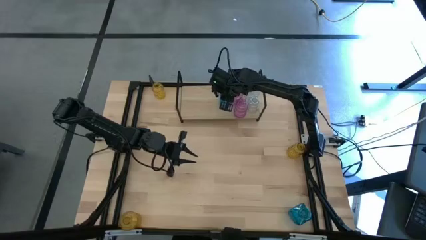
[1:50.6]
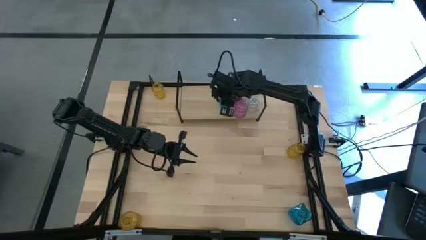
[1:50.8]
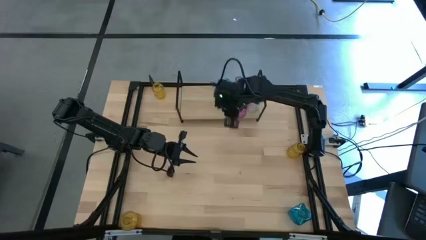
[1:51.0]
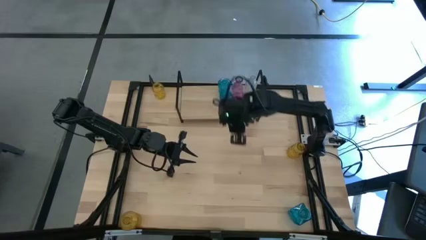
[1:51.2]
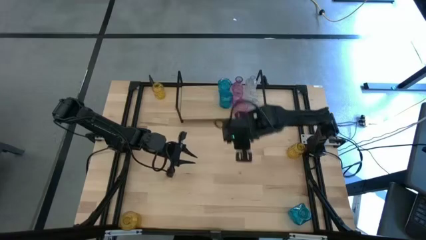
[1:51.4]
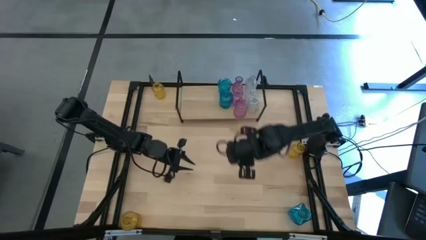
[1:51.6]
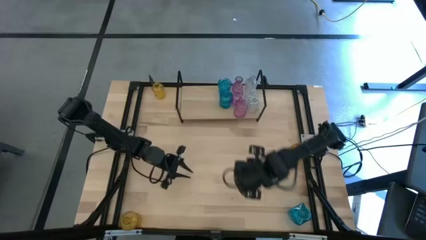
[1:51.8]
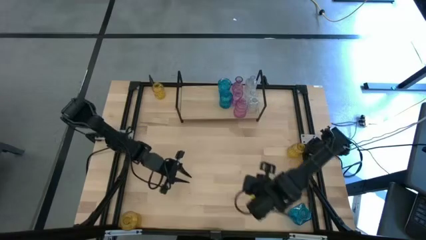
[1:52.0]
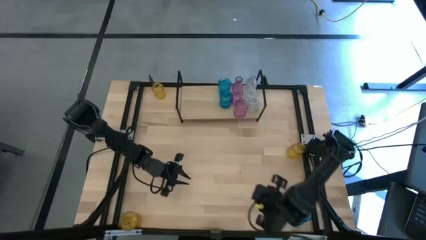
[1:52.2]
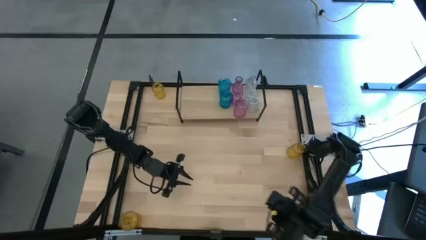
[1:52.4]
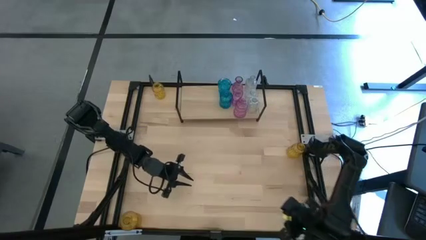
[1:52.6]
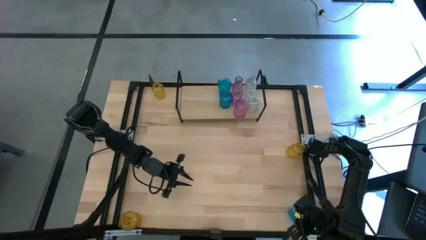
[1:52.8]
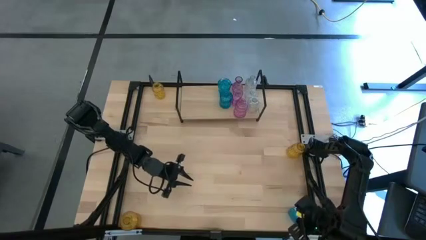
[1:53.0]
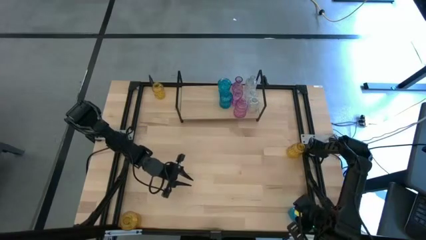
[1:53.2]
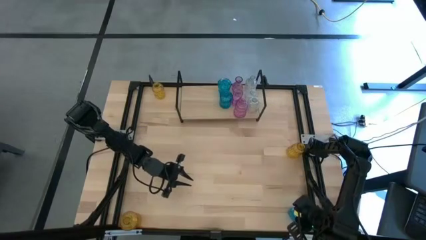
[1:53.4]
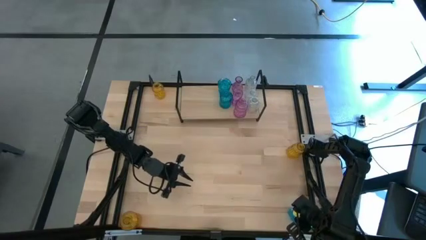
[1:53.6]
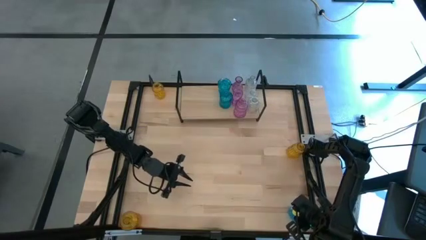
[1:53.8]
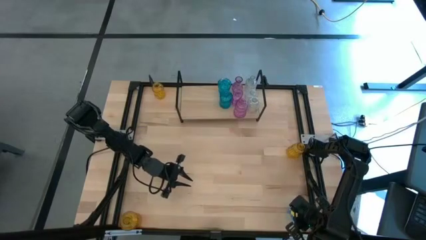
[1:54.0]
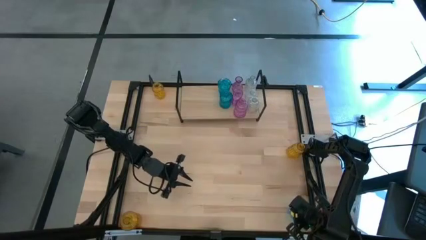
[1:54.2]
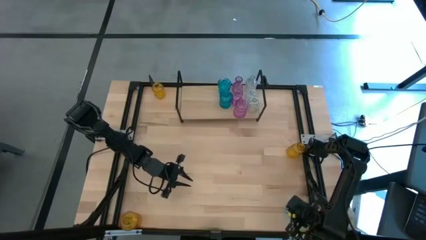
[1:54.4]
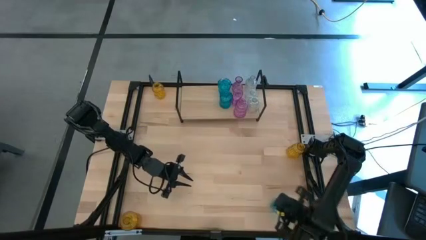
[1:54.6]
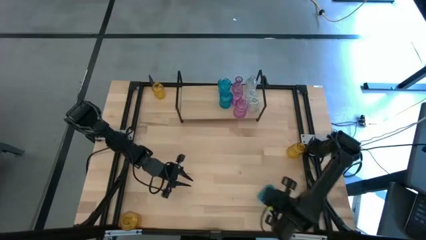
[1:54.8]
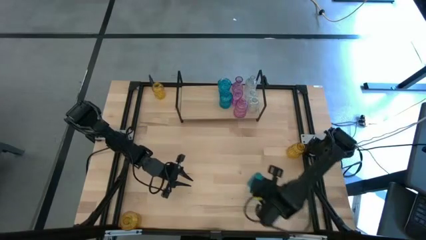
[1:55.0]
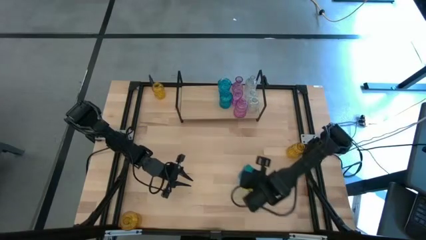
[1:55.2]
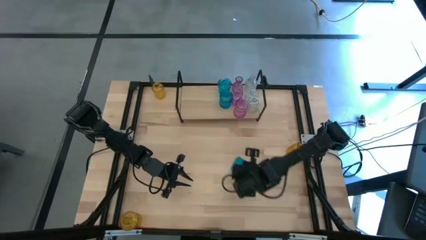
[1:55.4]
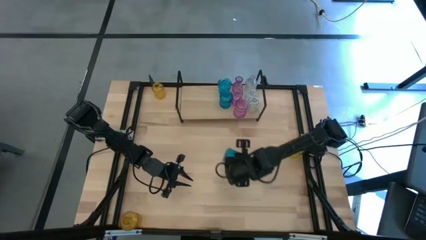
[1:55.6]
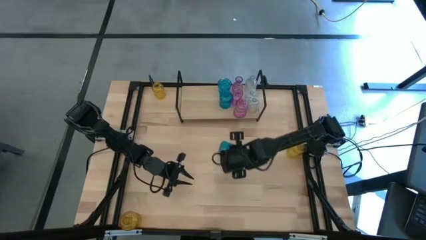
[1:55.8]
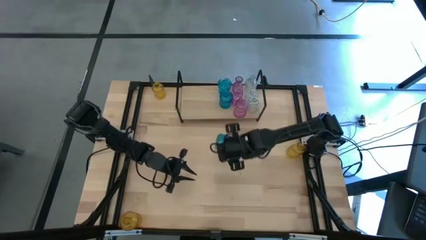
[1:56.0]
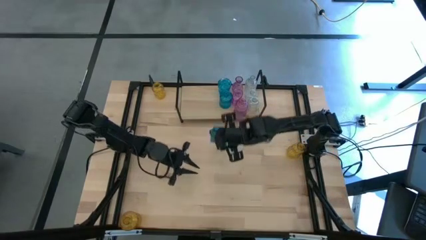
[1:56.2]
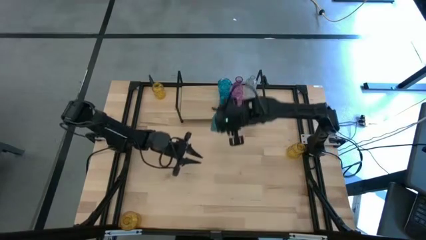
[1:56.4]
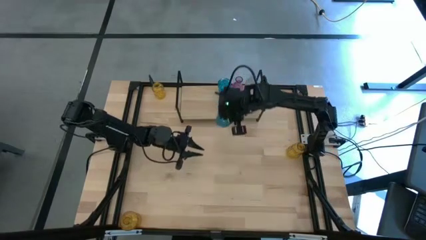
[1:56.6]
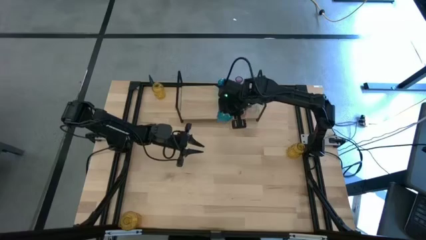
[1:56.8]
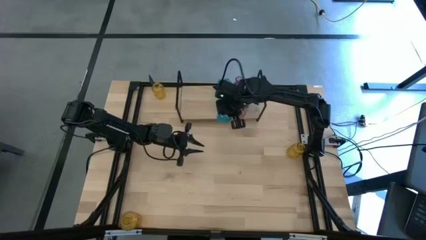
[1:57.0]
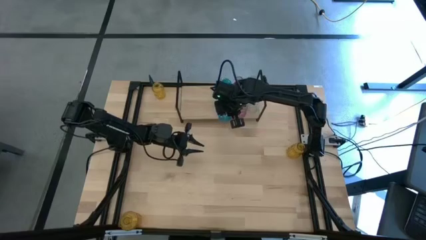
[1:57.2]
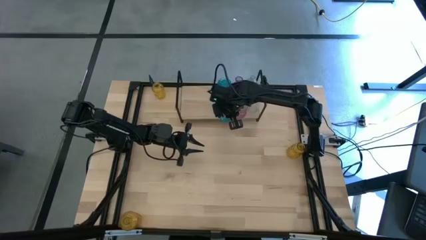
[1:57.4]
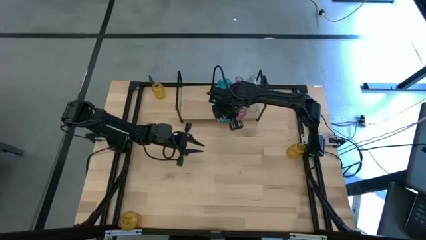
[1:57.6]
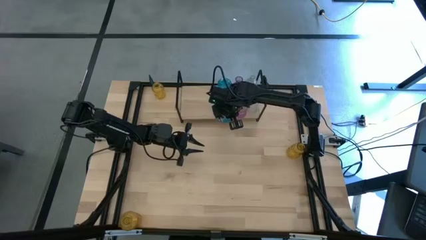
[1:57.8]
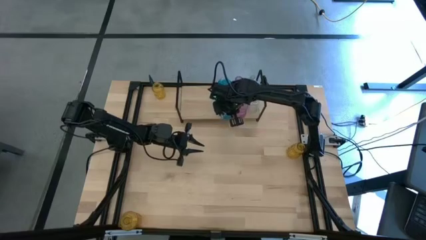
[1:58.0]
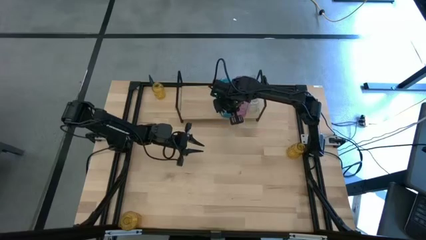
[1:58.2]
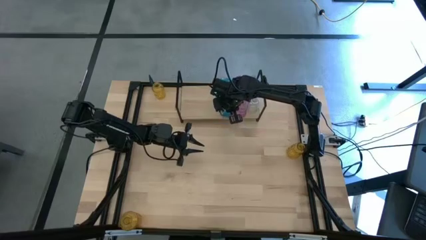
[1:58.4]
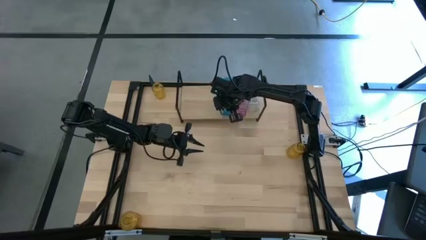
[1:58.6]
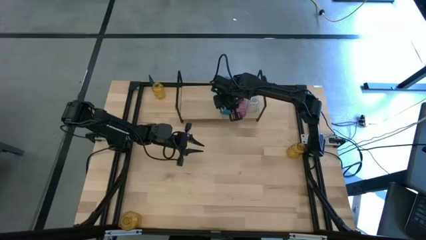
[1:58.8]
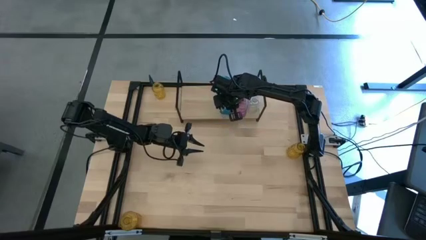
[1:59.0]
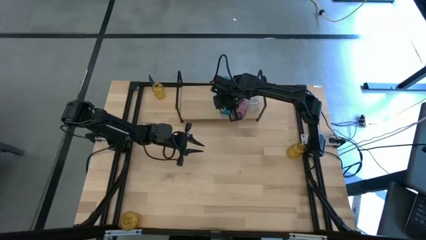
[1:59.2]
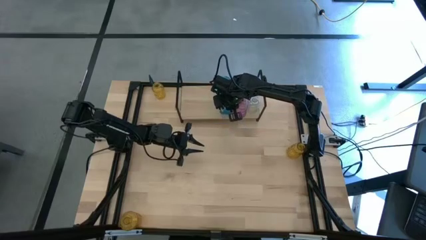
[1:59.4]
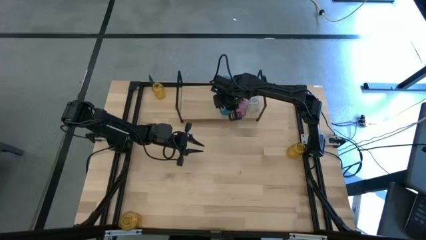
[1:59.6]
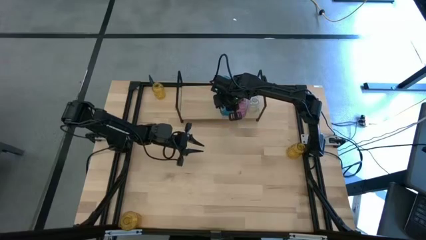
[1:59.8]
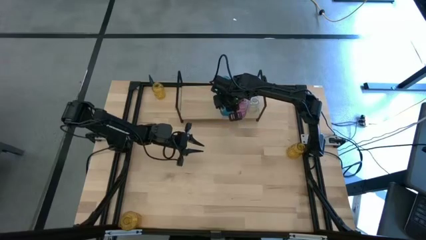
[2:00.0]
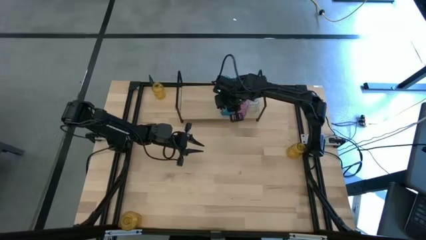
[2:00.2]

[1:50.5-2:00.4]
Task: sort vases onto shelf
Put the blue vase aligned with the other blue vase on the shelf

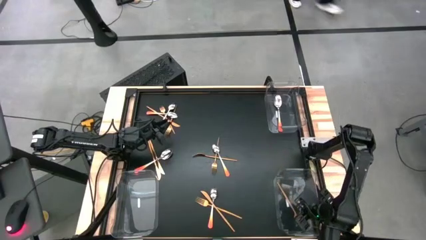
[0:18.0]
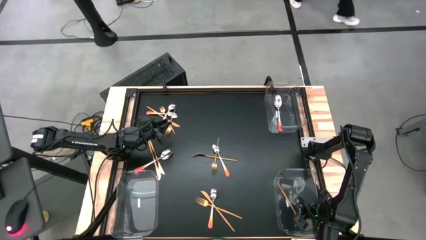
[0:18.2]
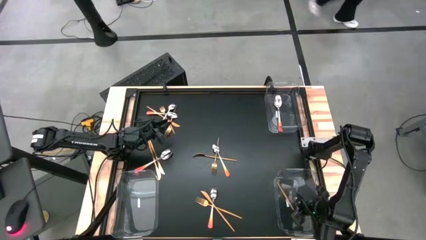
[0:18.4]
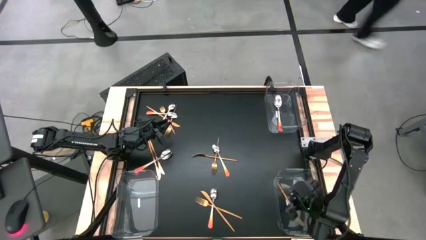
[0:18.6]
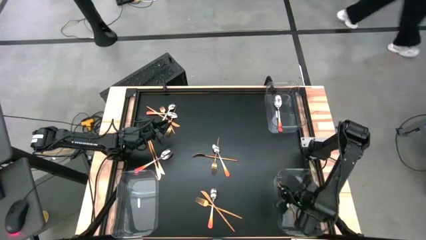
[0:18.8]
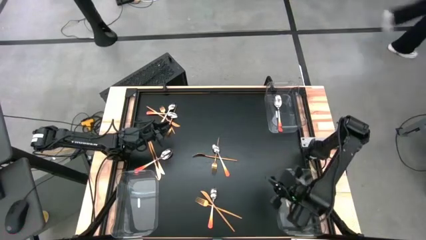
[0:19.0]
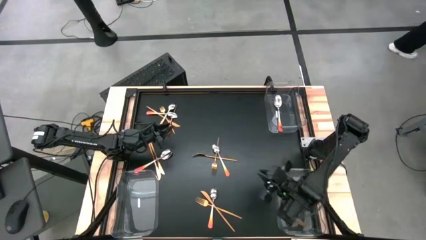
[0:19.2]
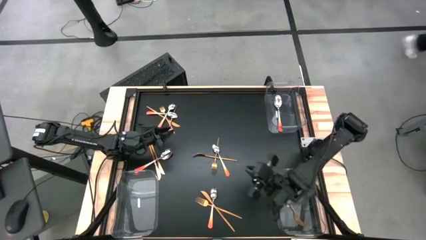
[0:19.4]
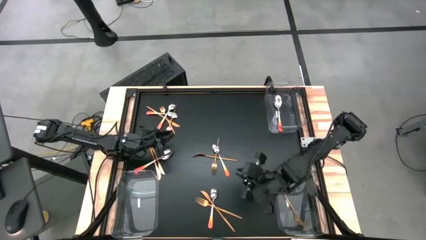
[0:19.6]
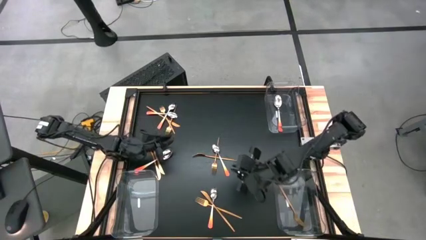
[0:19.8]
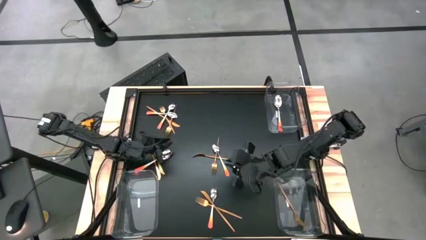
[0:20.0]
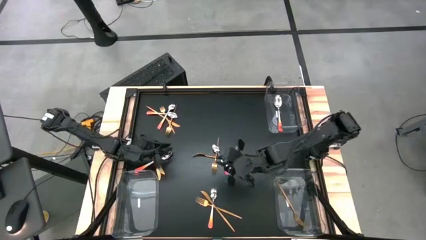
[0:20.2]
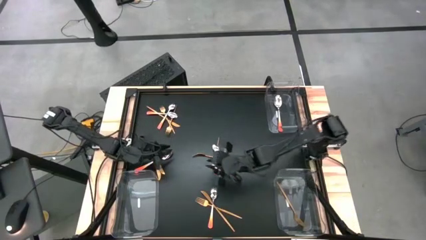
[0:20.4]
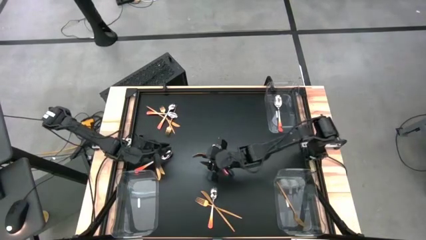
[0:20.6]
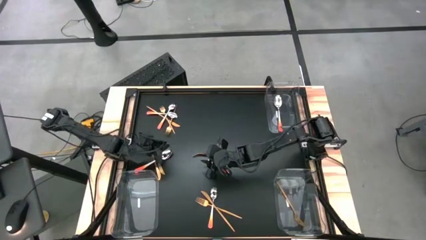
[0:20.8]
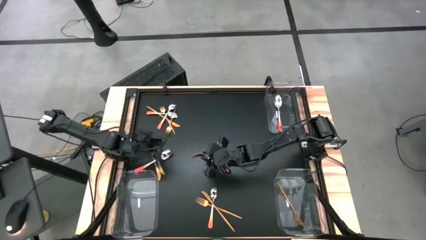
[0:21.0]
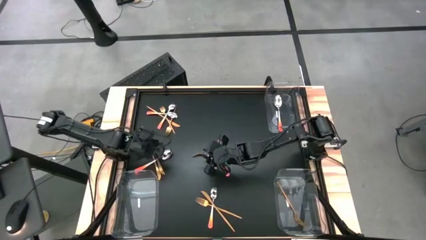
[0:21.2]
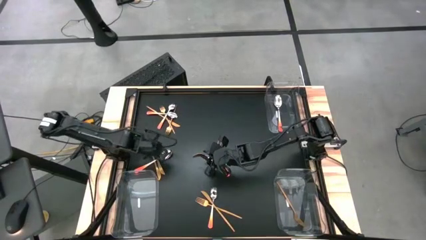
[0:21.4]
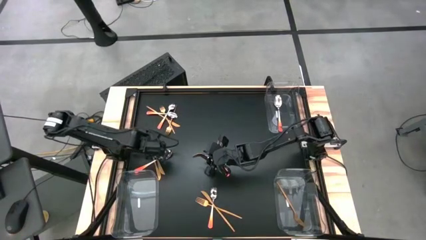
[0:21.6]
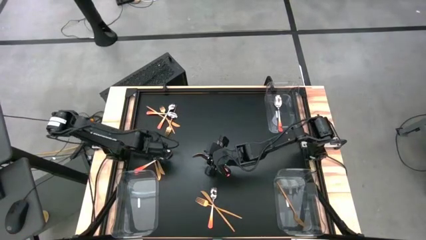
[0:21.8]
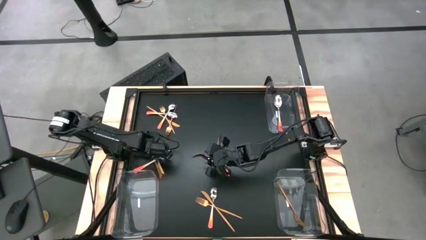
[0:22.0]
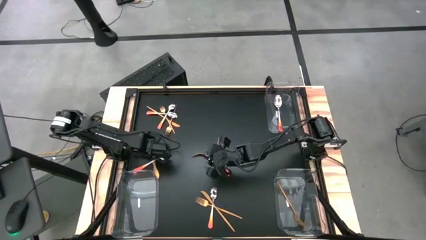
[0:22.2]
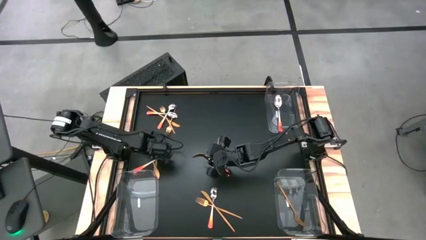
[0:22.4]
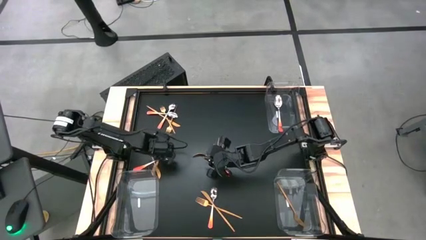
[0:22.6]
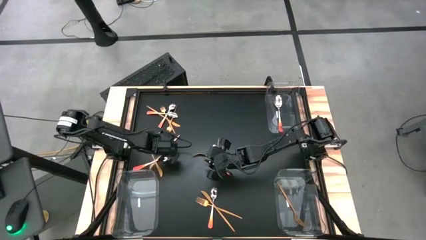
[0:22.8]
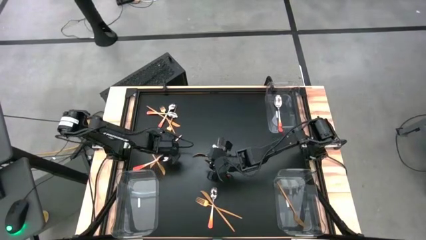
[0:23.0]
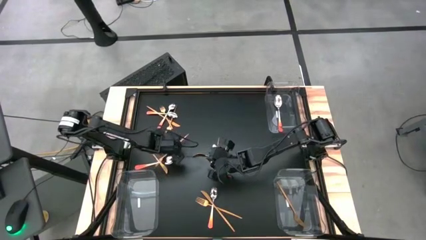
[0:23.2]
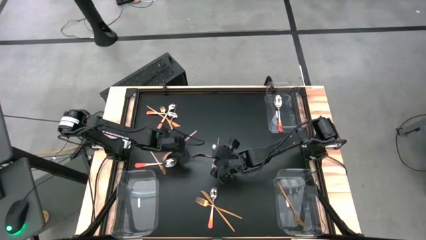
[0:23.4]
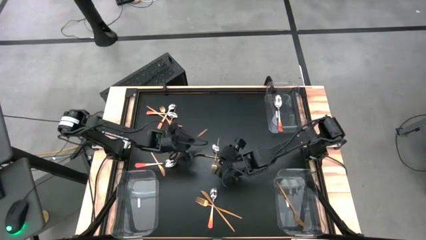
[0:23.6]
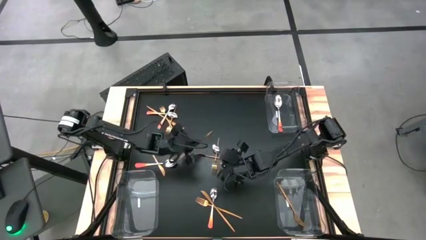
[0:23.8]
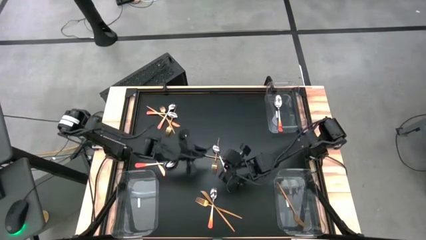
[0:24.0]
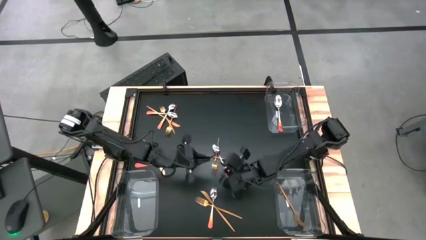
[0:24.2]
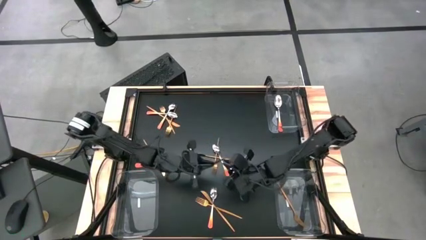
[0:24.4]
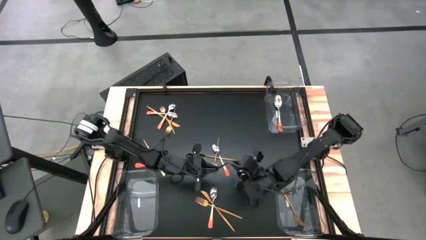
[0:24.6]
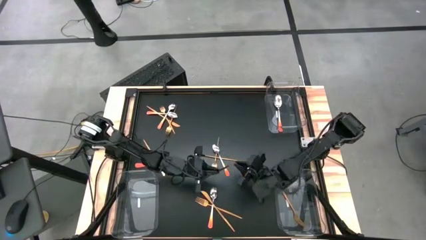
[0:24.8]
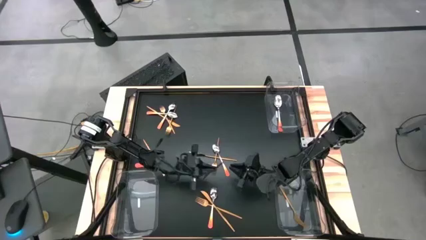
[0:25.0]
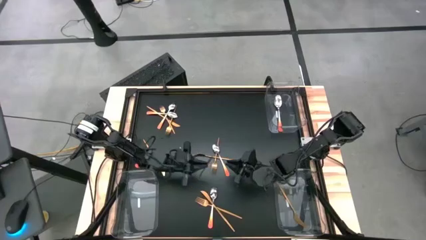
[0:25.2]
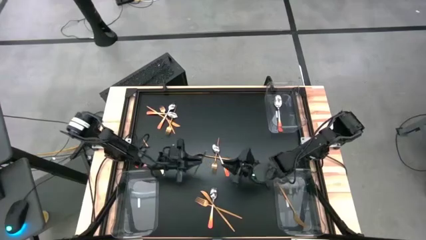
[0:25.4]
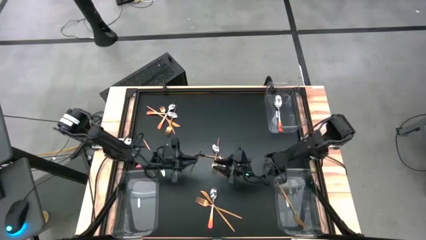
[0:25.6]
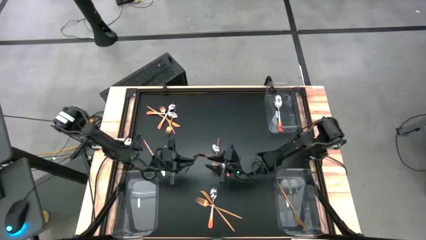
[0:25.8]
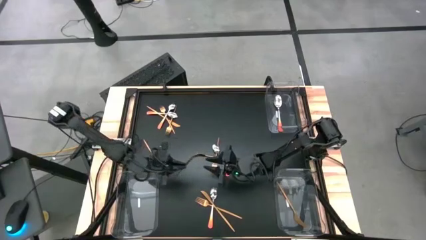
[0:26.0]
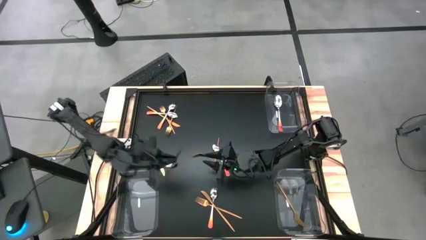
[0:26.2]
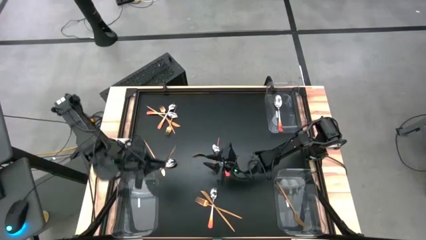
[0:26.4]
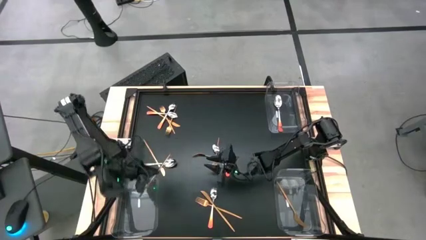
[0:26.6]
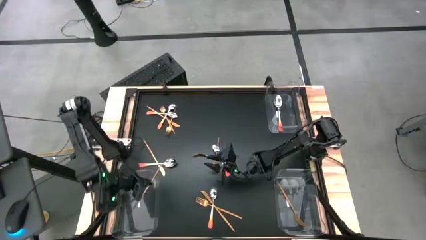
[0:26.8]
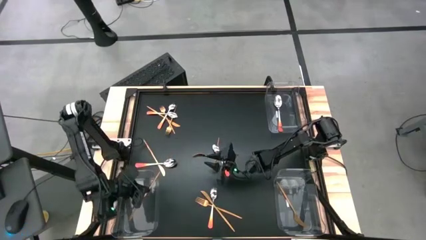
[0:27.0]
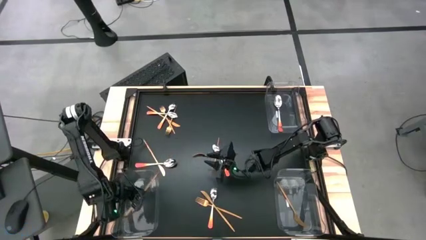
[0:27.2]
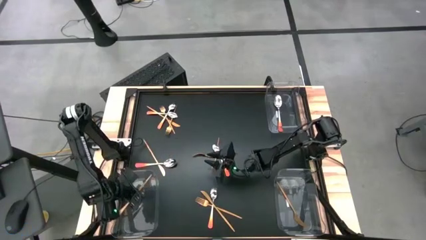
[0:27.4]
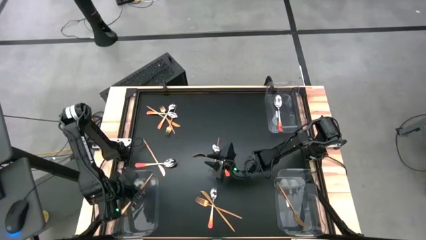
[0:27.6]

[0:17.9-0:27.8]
Task: Sort silverware by color (type)
Put the gold table knife into the bottom left transparent bin
